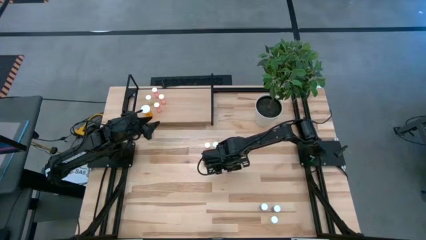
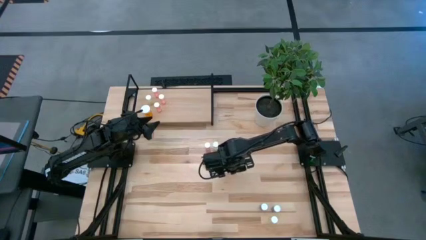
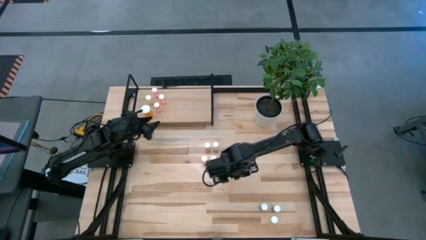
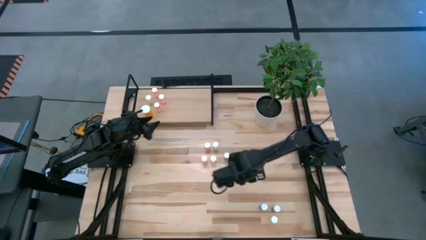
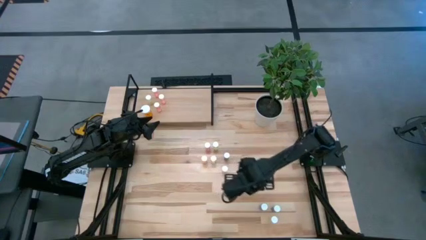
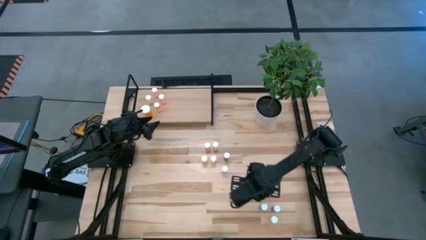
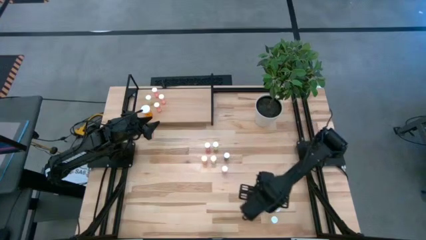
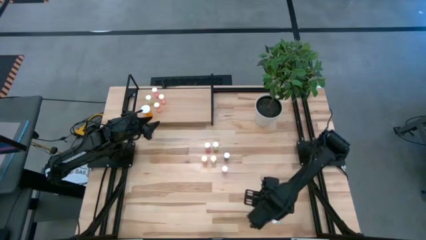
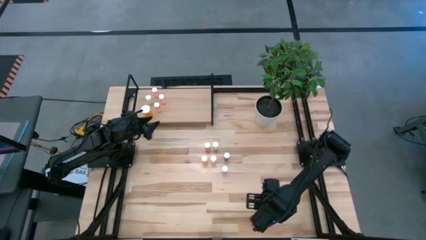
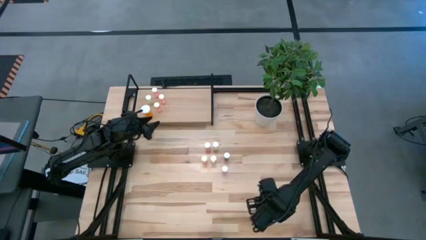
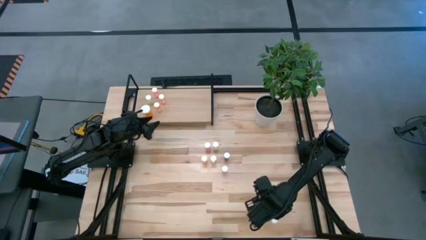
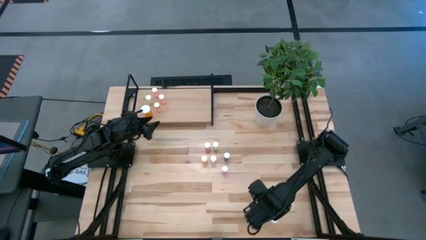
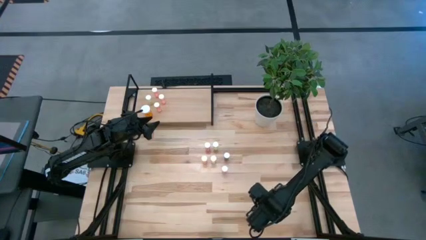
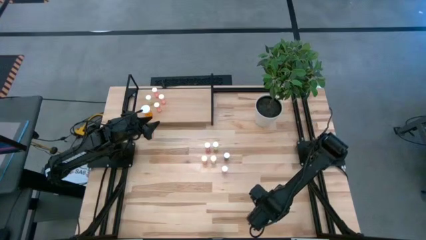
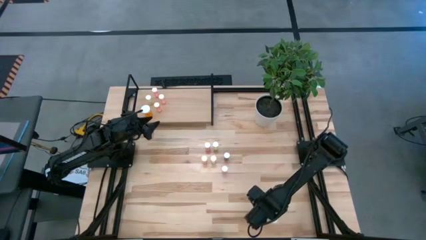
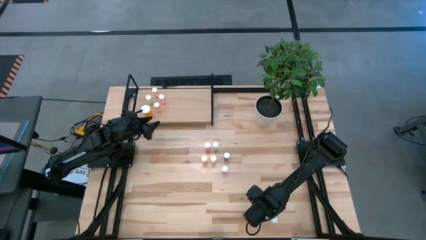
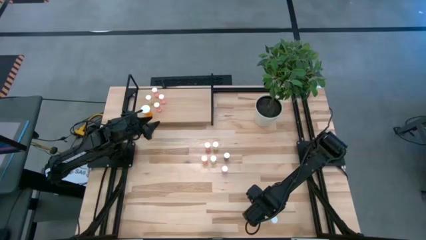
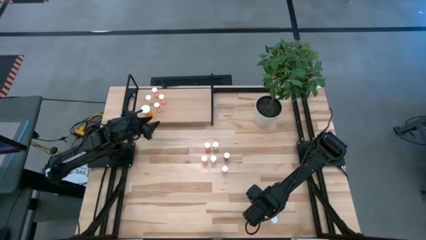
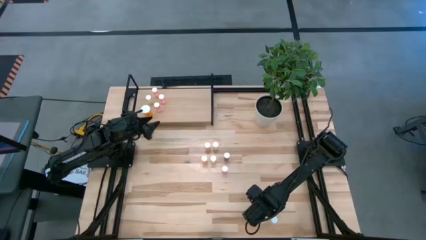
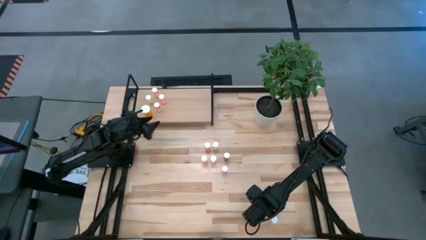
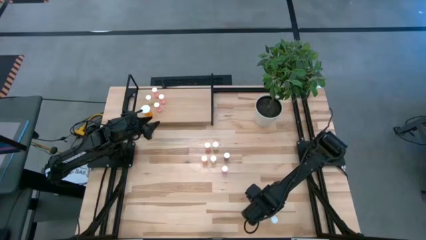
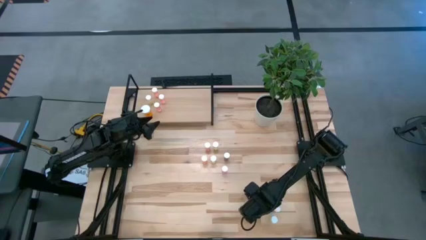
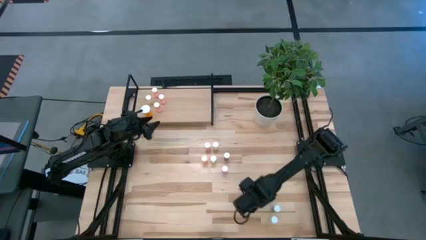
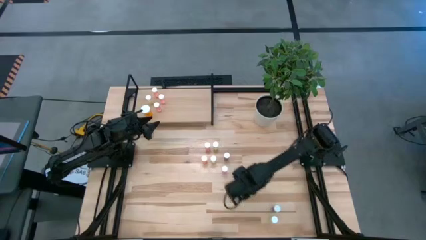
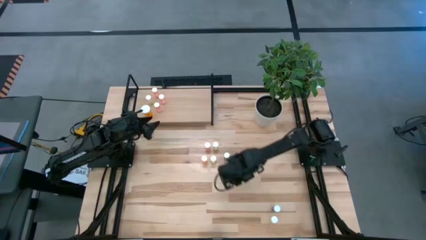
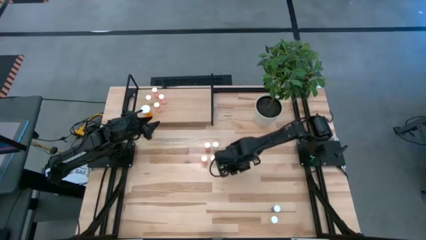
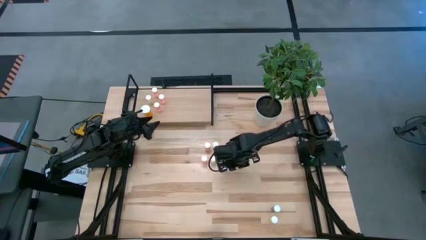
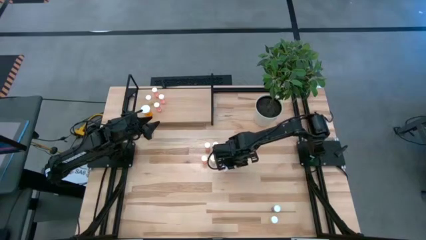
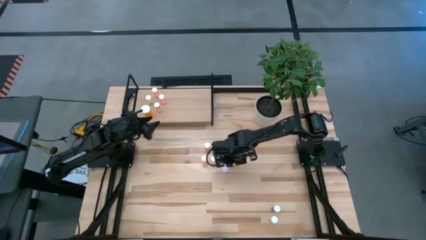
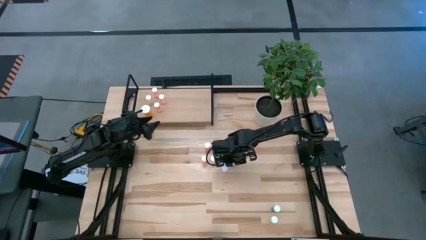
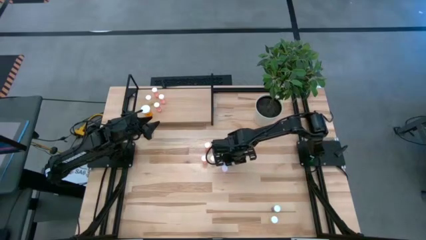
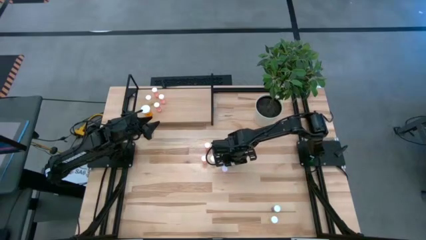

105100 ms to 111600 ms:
Task: Pick and place medicine bottles onto shelf by color
Move the blue pill bottle to the center

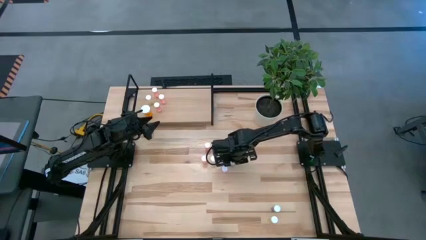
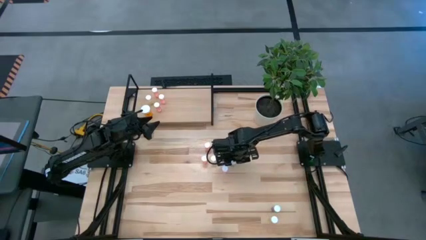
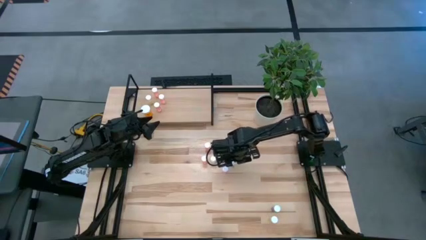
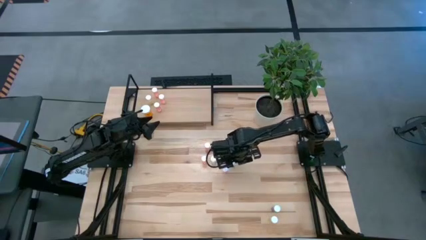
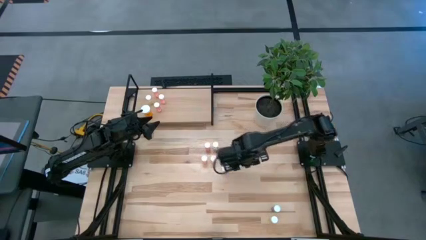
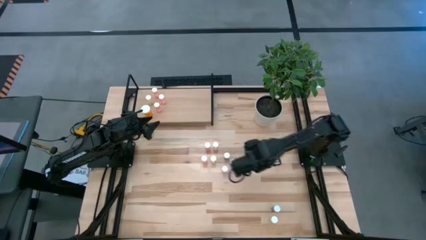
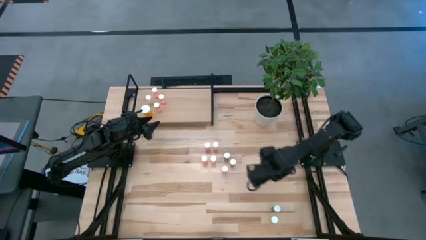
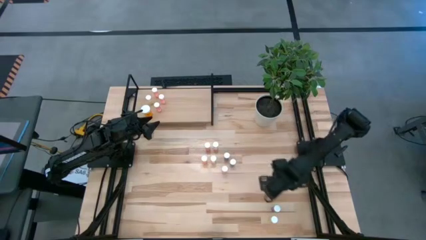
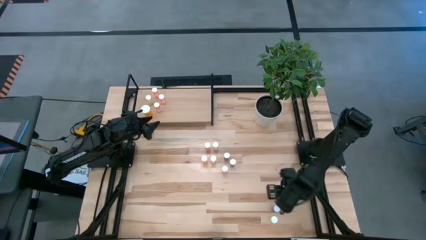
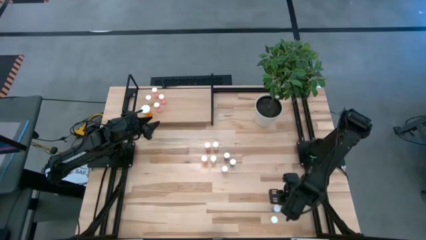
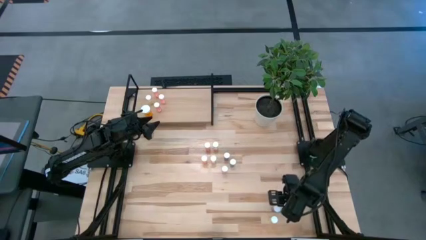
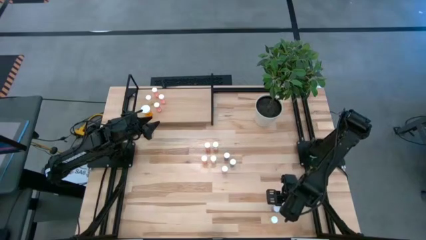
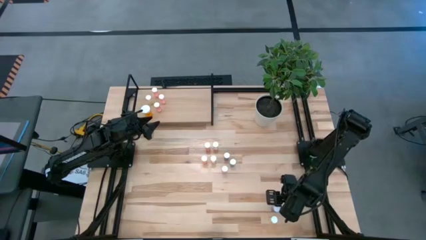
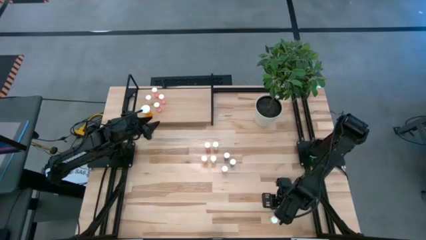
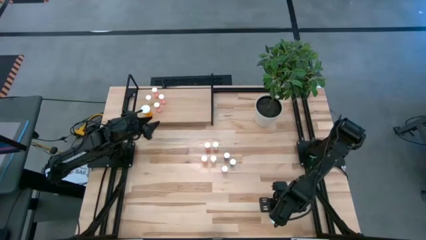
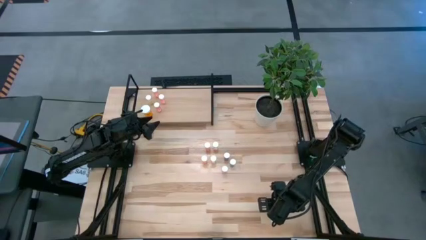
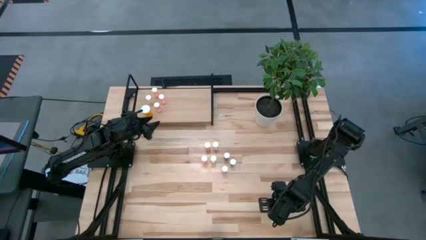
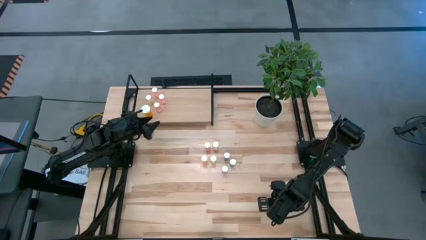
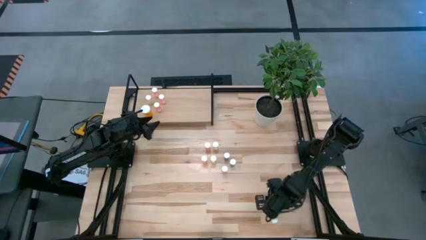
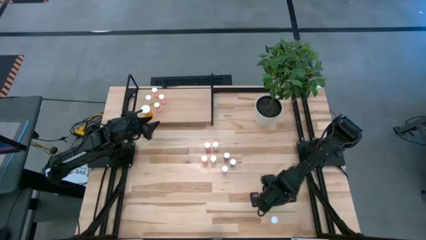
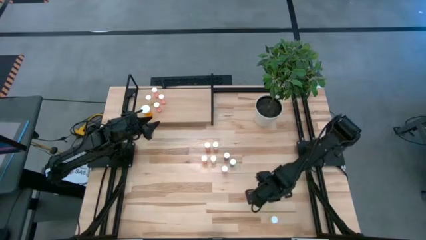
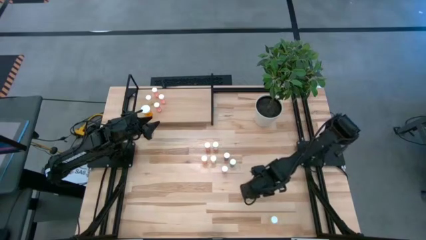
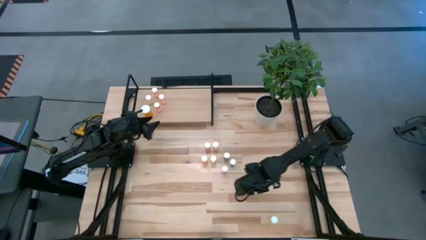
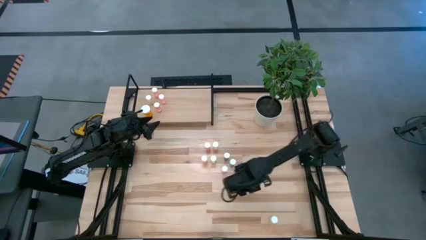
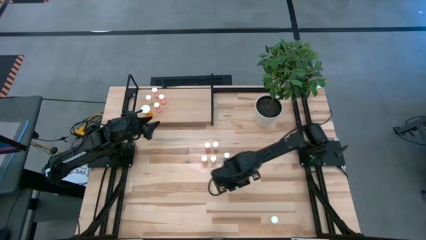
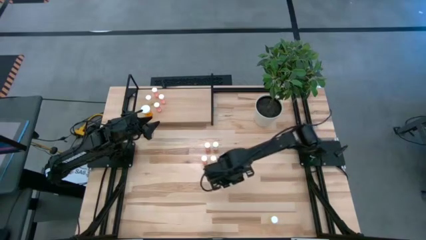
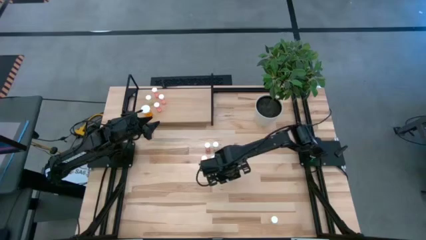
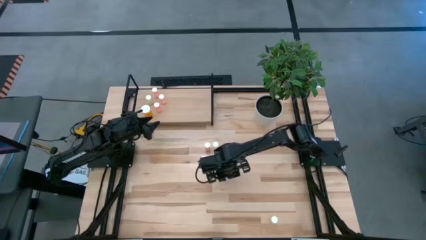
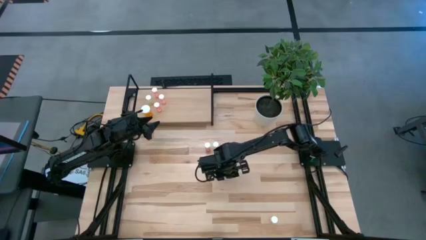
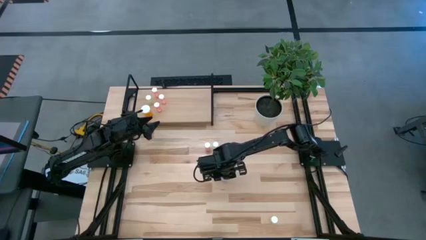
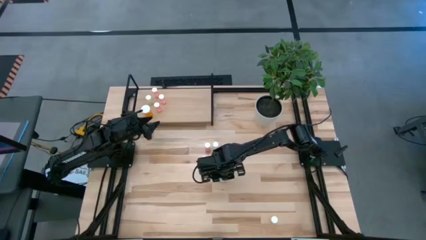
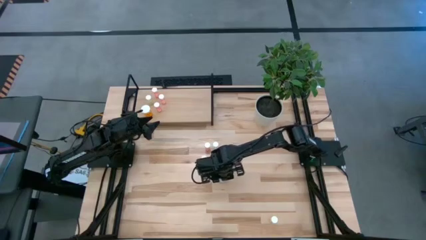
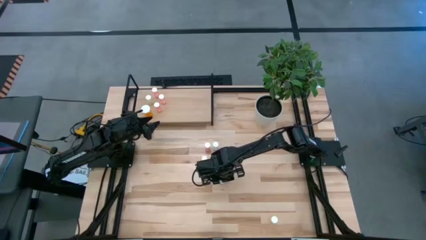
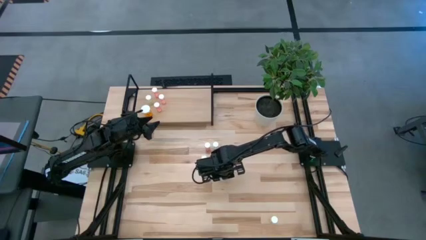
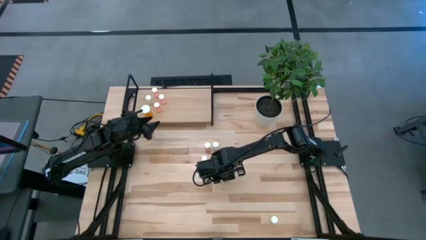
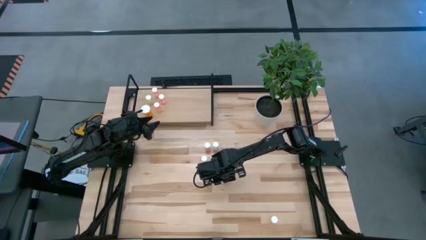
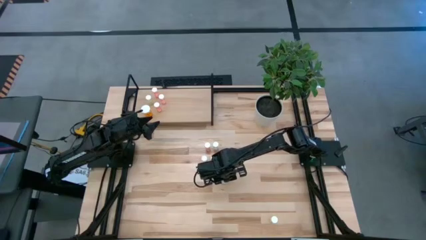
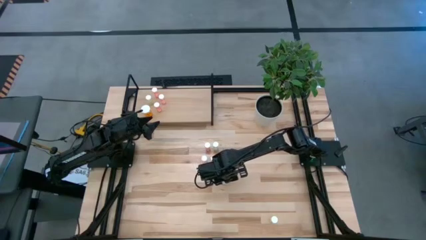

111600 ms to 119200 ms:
Move the blue pill bottle to the center
